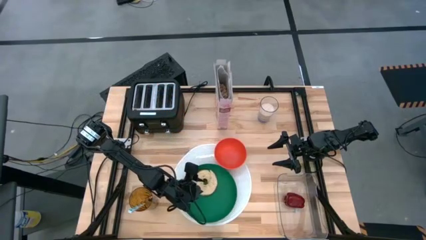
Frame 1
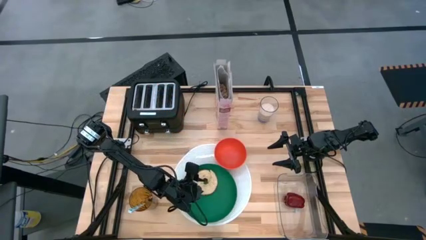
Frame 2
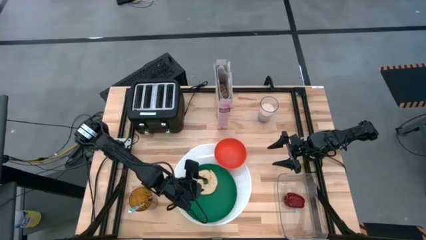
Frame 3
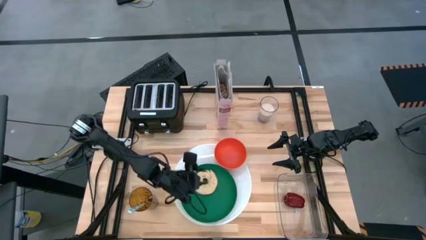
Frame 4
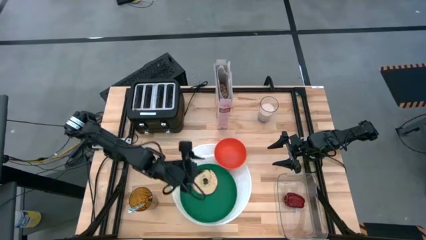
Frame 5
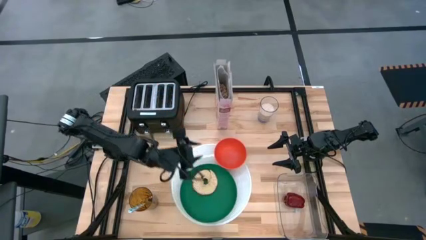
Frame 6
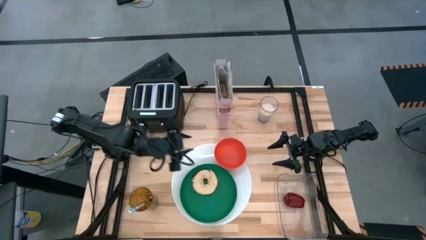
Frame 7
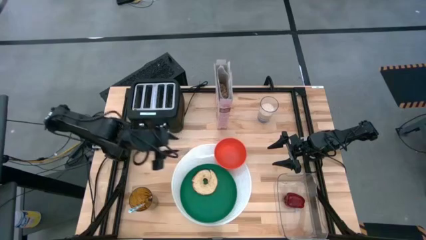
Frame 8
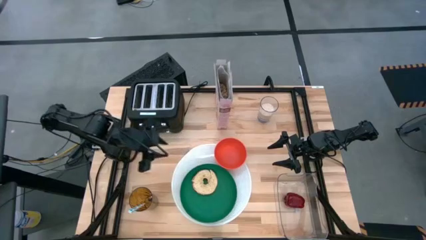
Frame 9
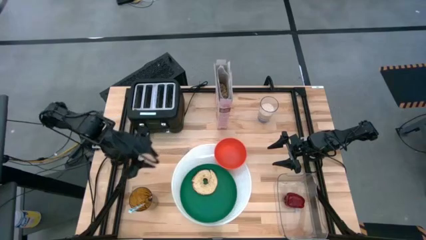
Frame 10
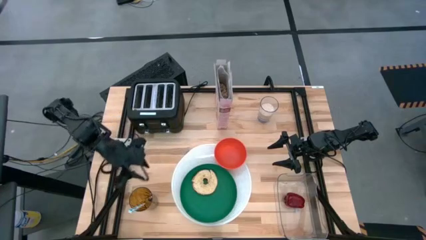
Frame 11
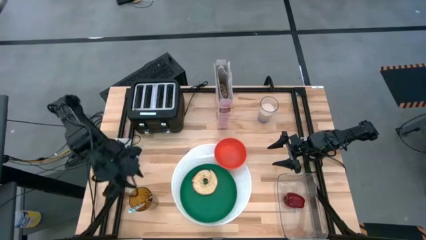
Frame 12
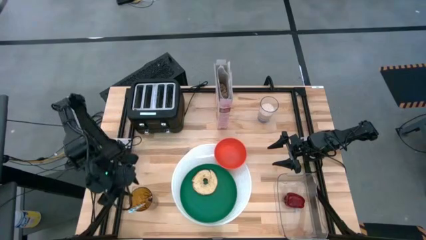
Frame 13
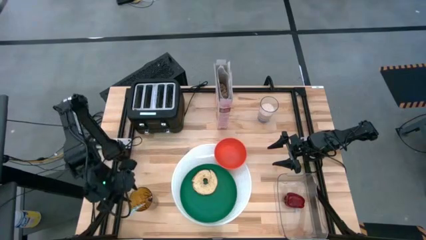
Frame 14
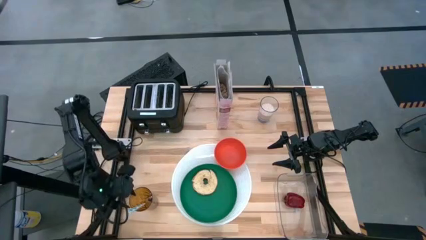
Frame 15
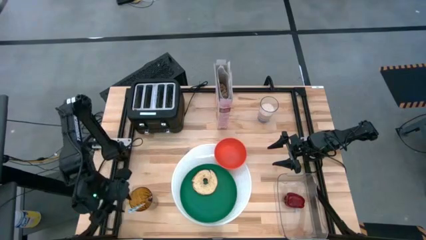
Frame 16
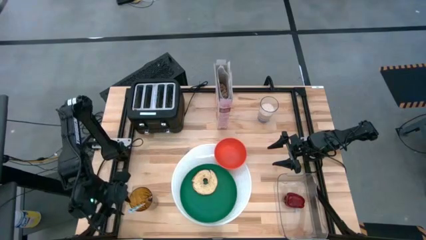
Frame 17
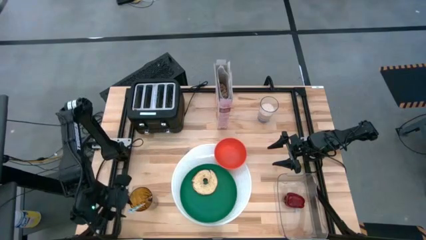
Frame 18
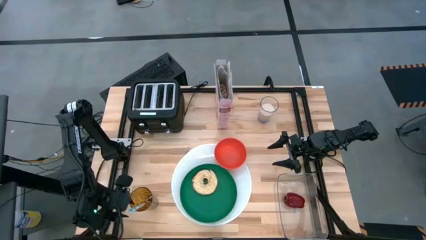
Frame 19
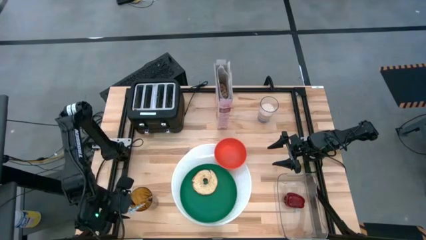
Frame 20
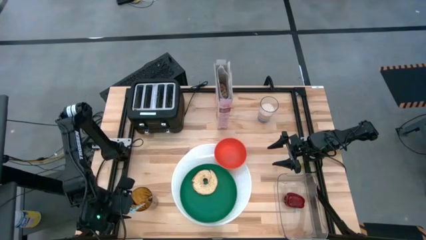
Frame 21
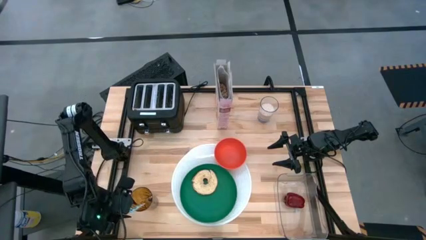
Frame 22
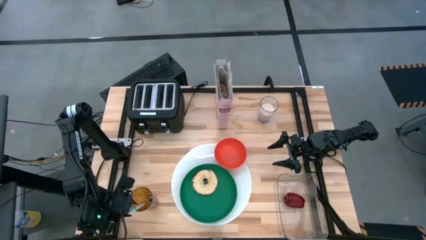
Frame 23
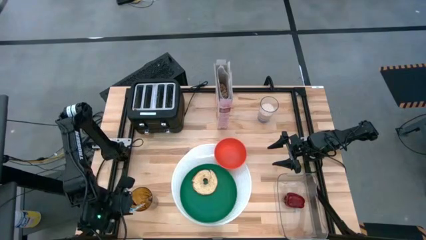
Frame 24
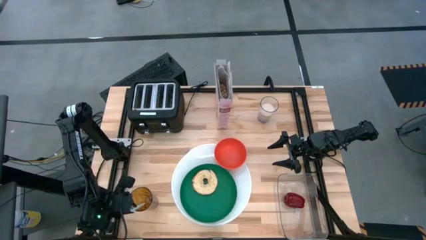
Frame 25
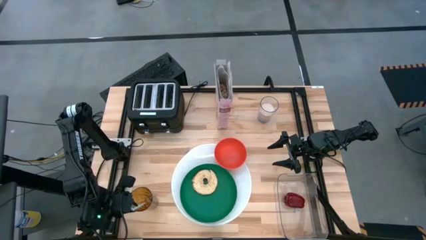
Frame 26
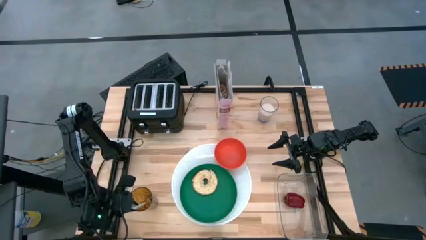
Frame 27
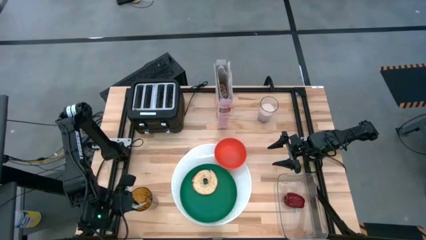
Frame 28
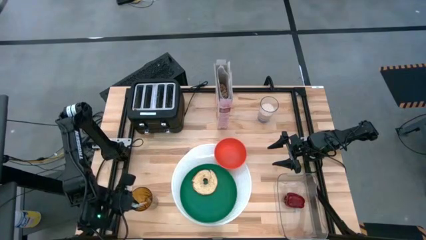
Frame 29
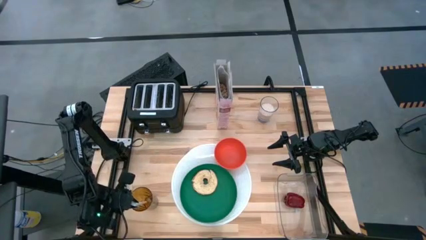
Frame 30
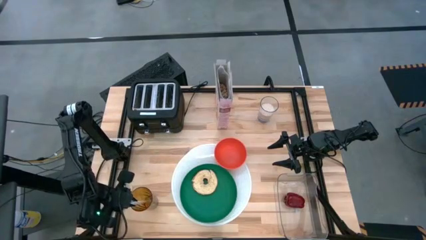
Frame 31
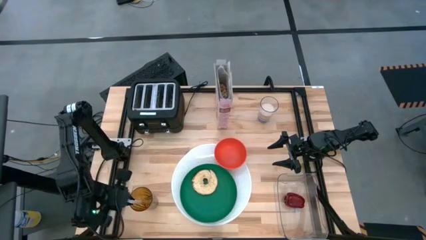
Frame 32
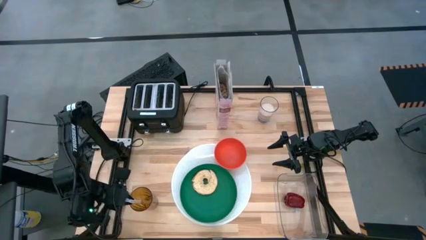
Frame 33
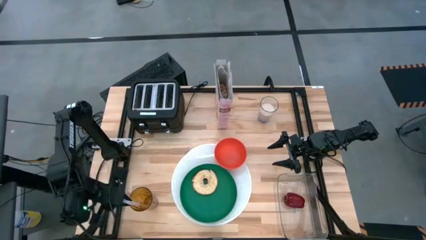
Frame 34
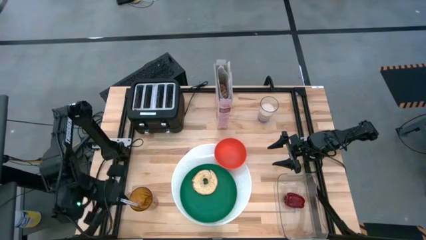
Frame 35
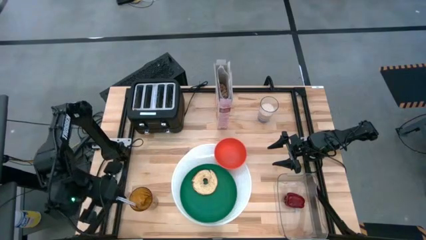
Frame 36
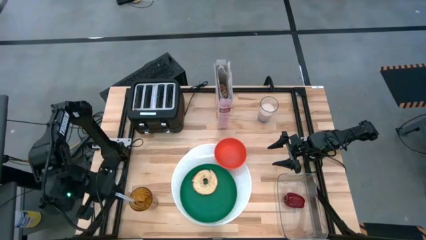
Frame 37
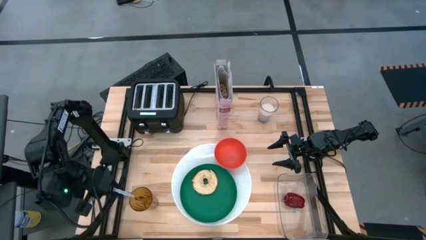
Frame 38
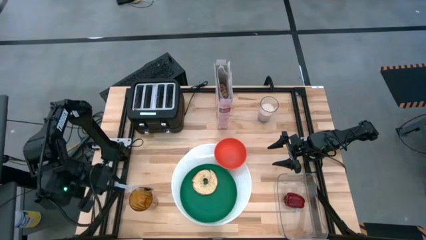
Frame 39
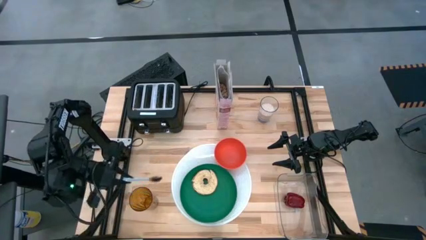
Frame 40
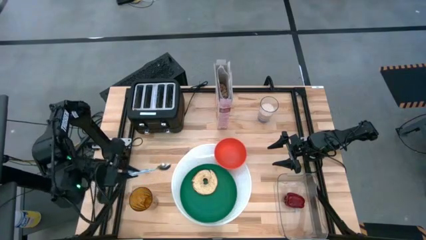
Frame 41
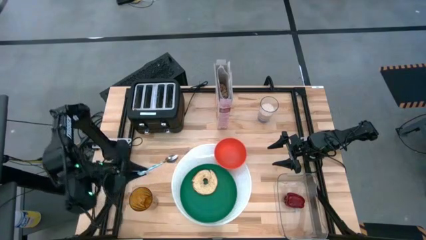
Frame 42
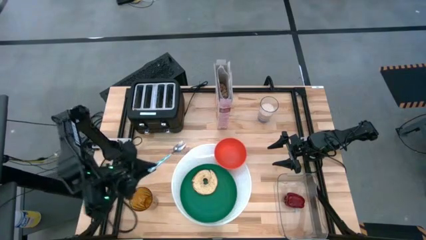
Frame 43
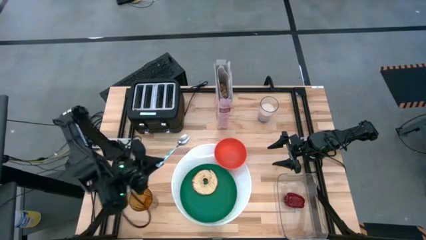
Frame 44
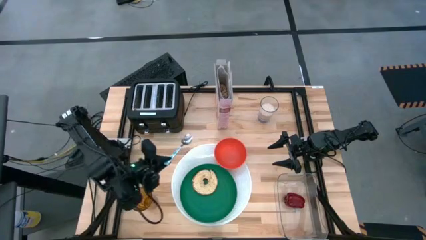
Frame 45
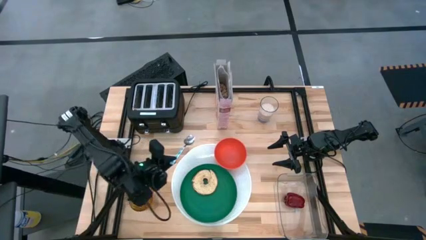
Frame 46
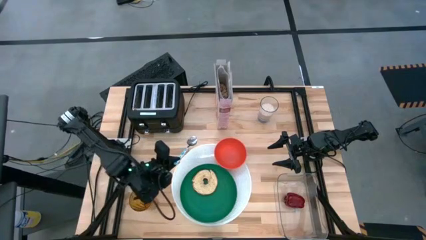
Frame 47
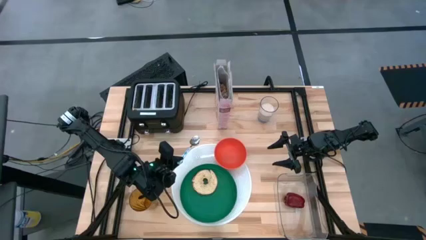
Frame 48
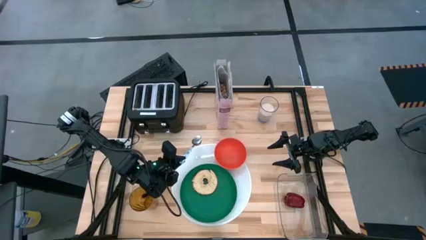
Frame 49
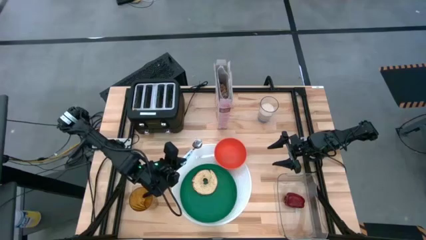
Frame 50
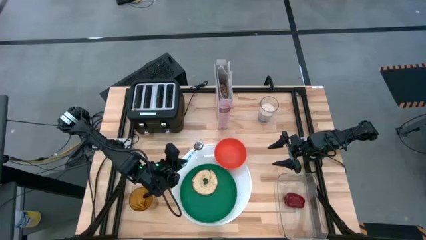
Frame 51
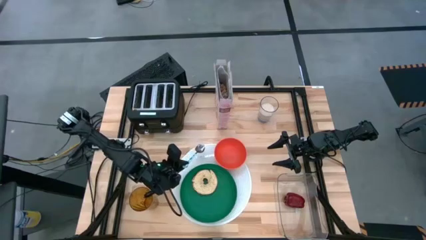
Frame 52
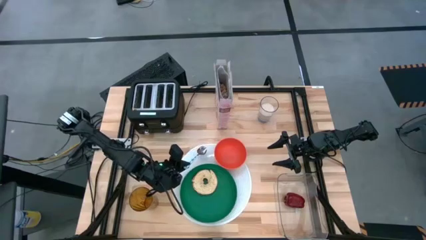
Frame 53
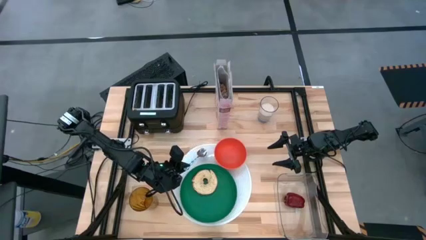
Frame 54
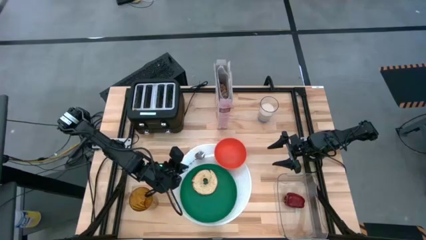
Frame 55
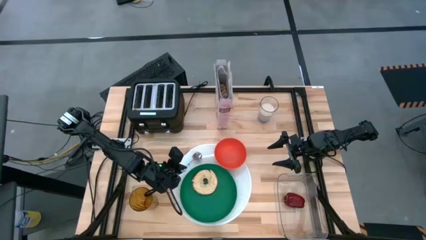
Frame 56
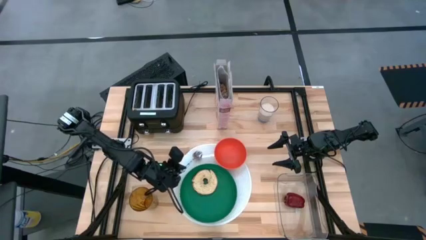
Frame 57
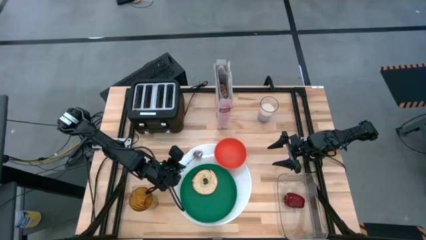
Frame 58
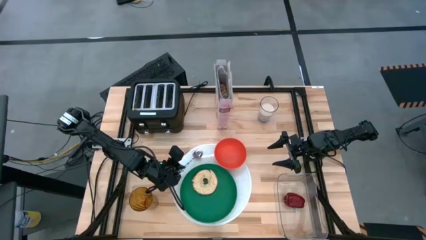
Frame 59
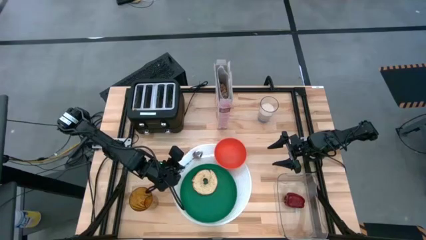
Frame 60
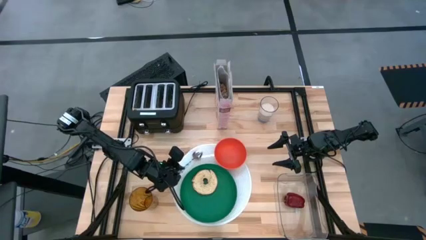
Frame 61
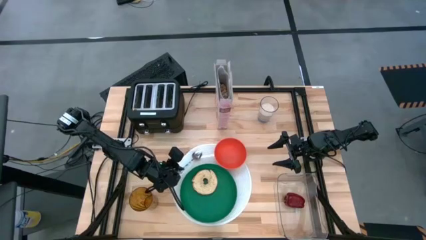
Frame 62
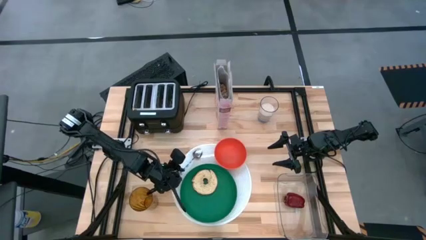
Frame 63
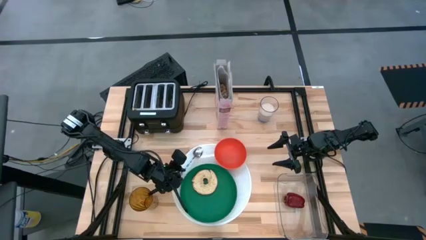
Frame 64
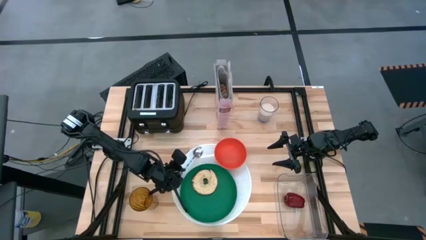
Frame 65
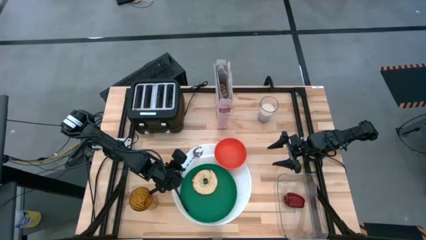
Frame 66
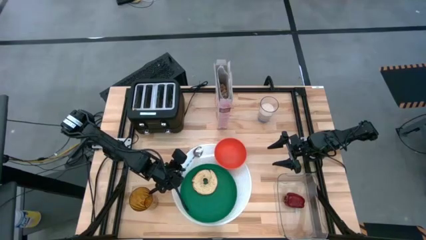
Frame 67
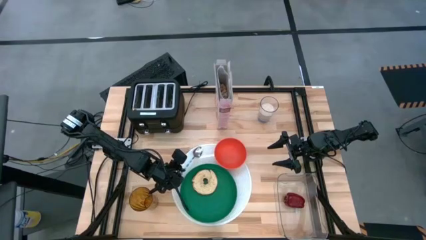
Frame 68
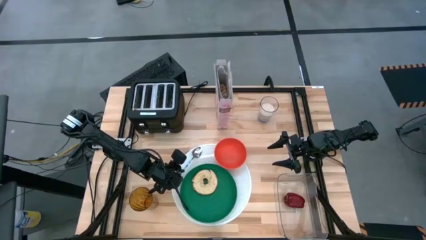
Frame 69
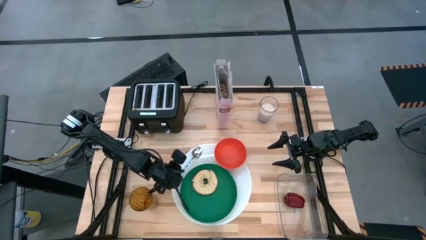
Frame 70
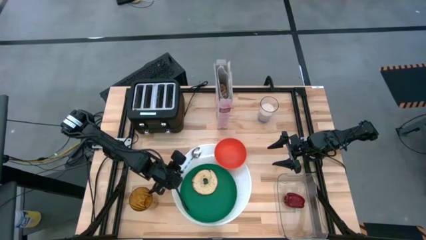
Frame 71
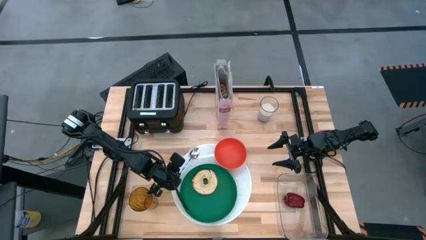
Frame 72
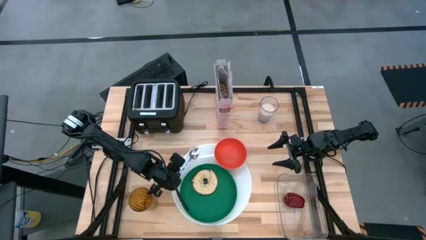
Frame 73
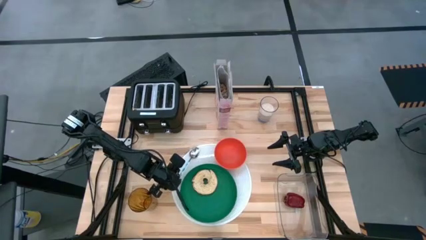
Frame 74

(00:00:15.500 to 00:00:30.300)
Task: Arrange a breakfast setting
Put the blue spoon from the yellow glass cup on the table mat to the top left of the green plate
